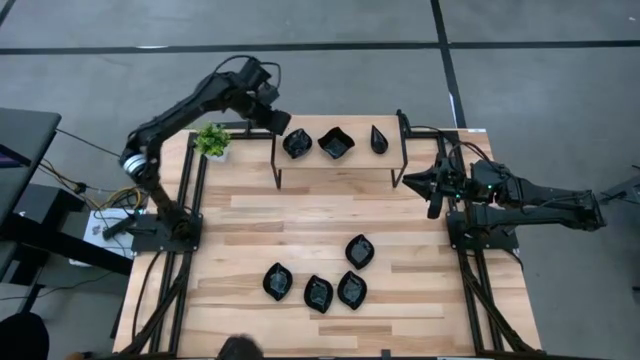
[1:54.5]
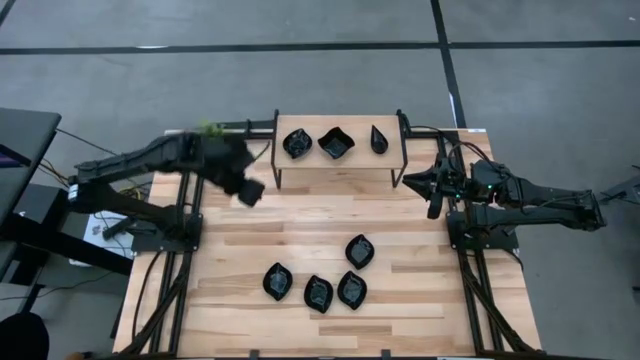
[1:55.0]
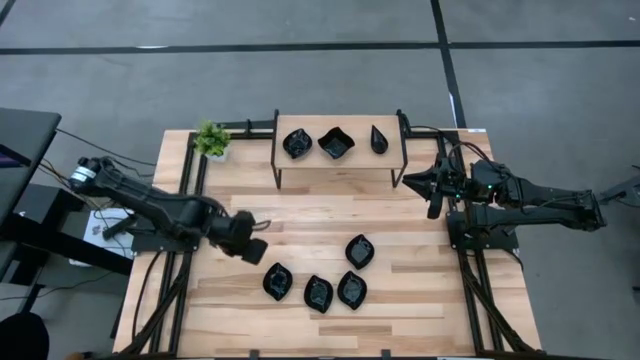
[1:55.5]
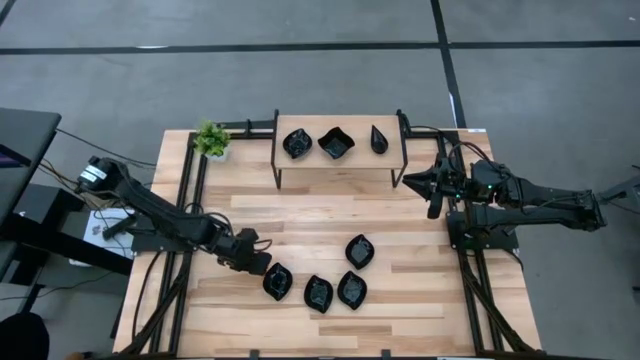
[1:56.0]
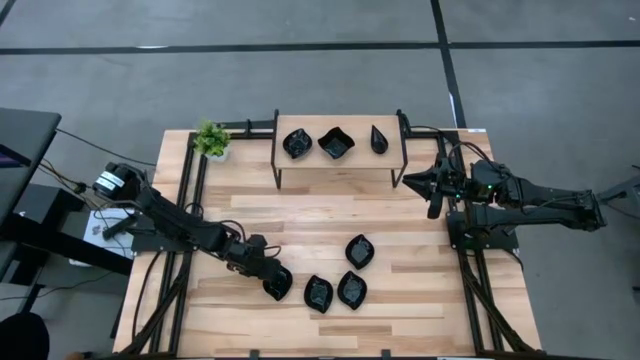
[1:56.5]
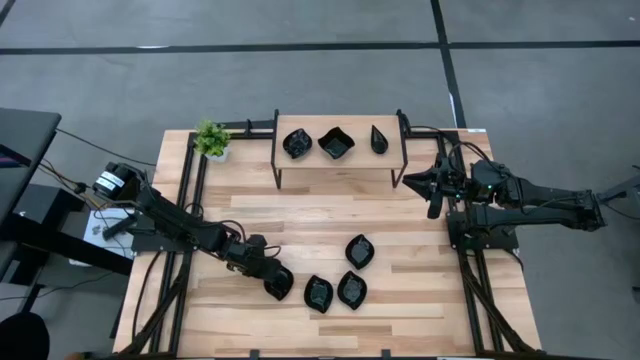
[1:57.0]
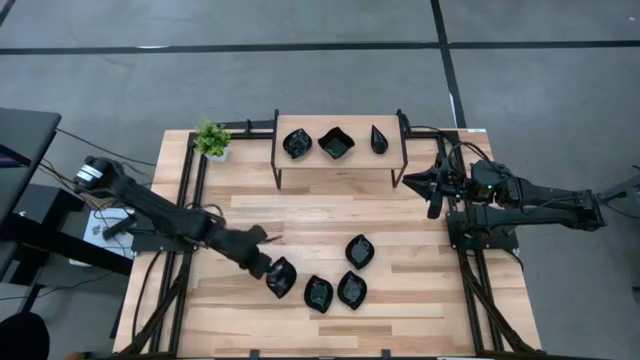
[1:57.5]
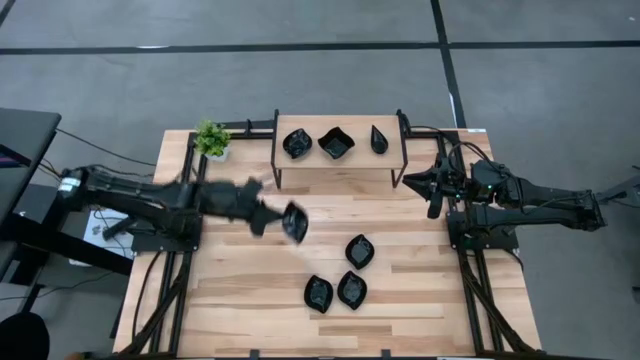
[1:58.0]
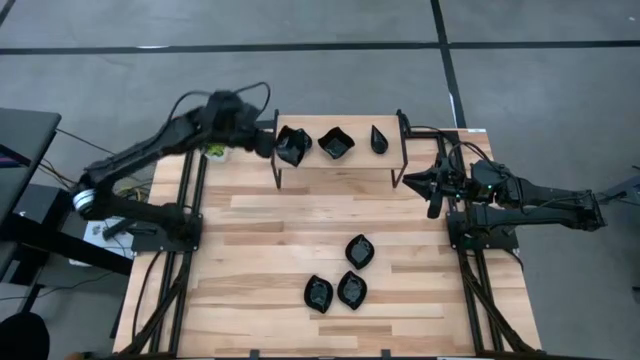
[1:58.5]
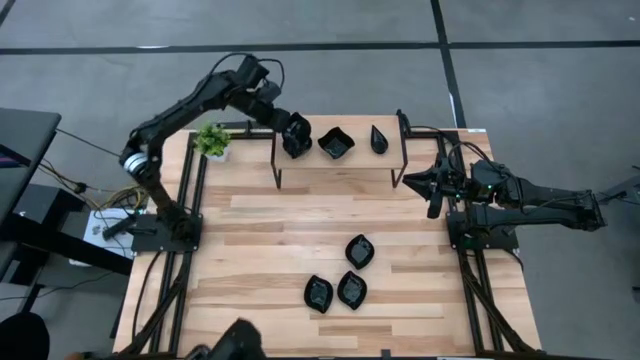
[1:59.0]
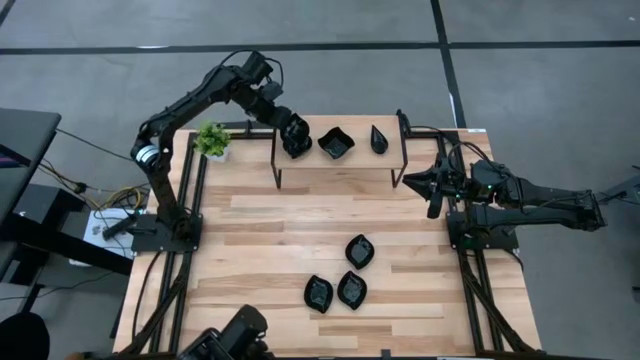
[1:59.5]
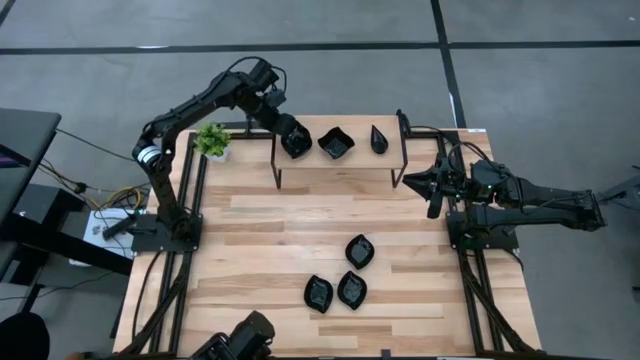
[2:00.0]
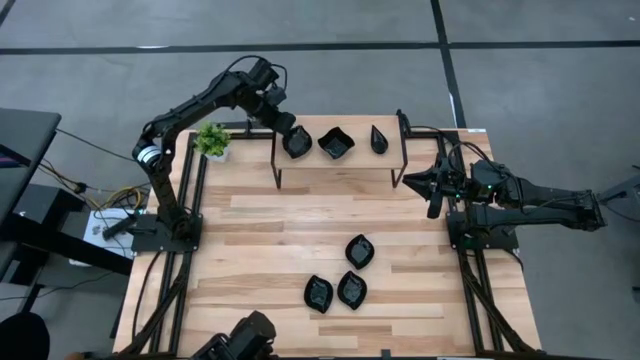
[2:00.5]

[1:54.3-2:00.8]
Task: Pick & Place Mini shaped plates
Stack the leaf shaped plate on top of the other leaf shaped plate on the shelf

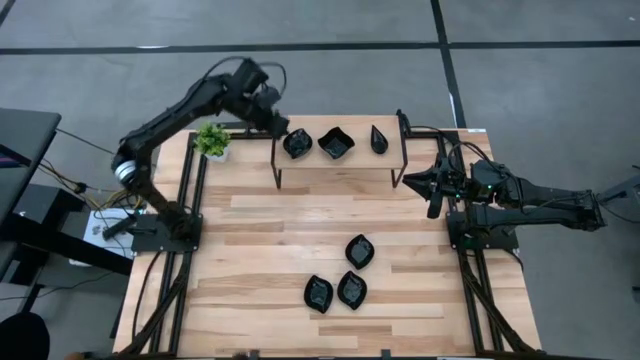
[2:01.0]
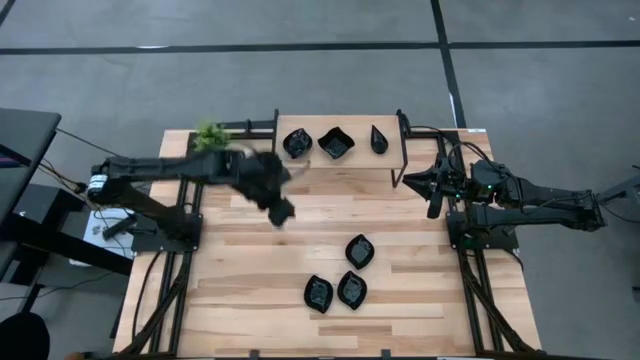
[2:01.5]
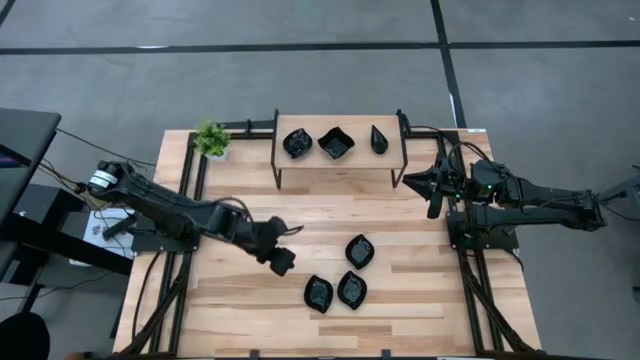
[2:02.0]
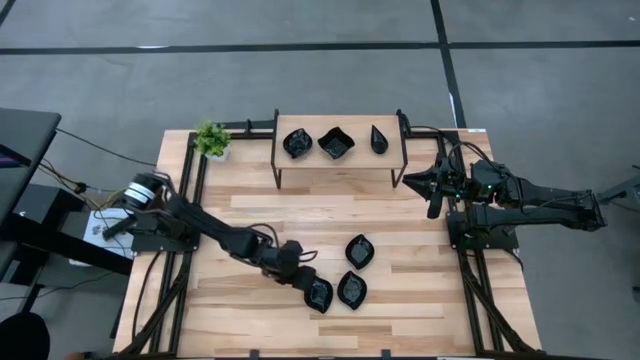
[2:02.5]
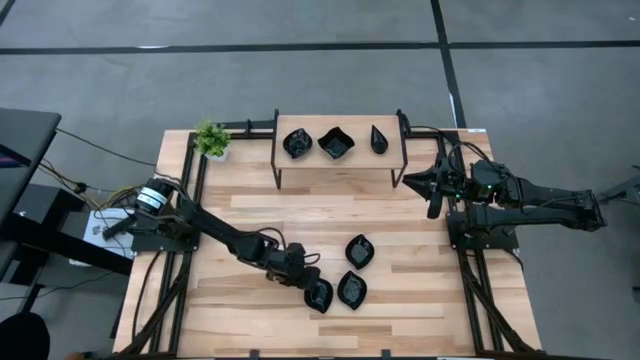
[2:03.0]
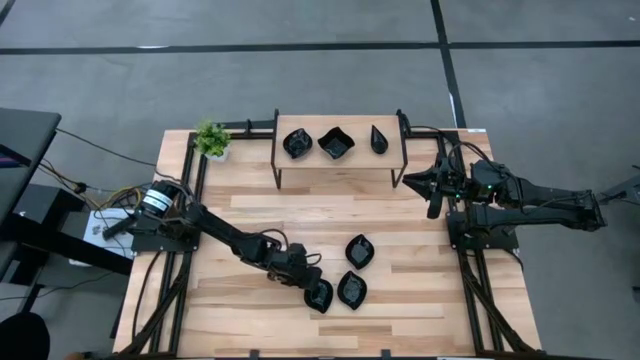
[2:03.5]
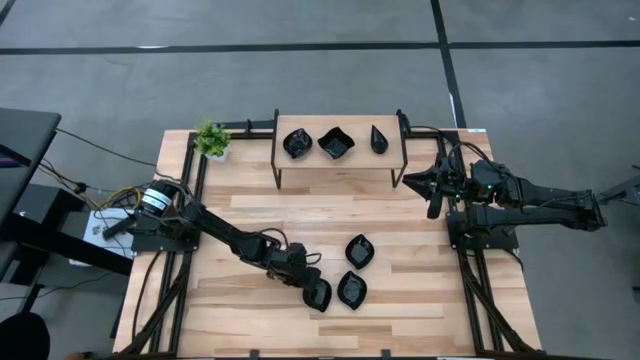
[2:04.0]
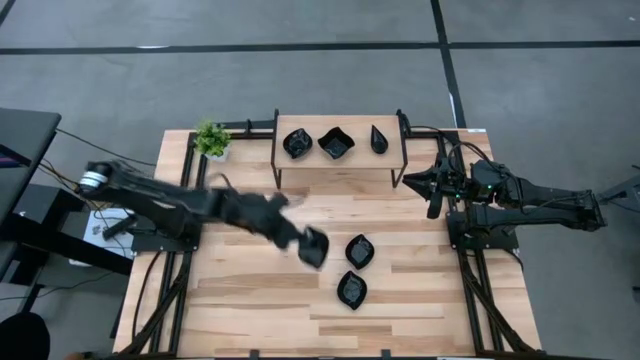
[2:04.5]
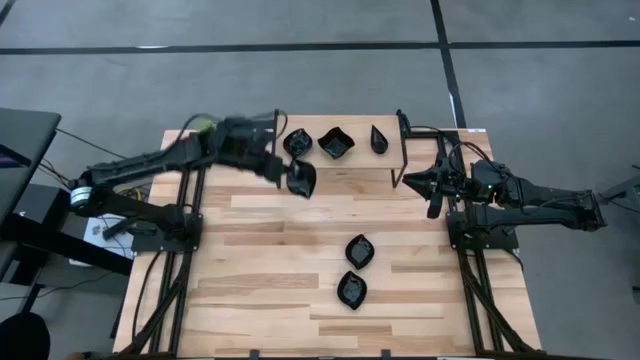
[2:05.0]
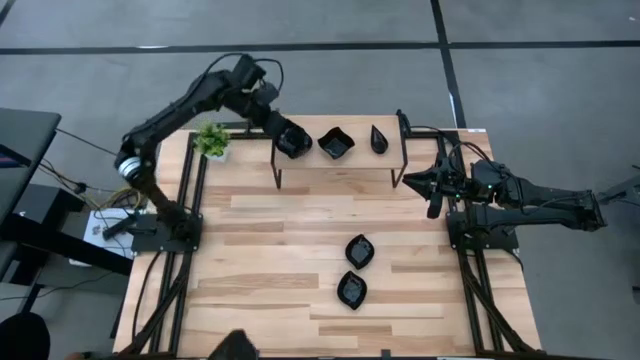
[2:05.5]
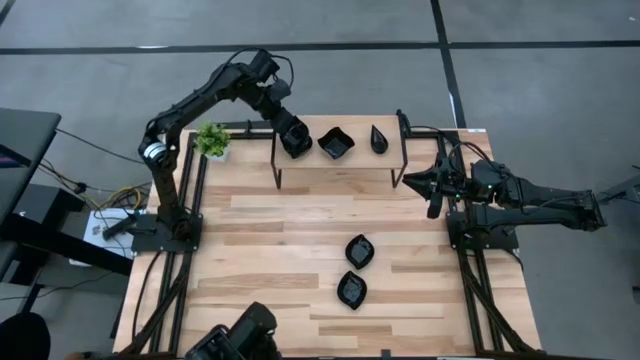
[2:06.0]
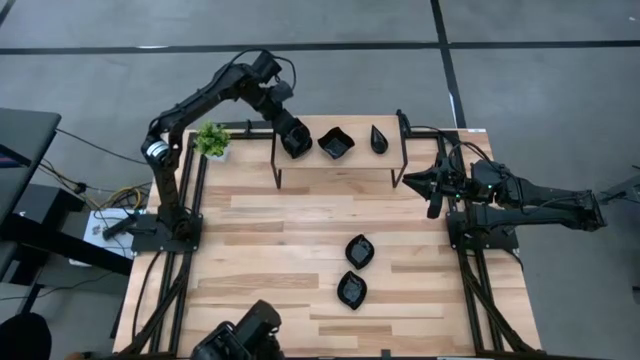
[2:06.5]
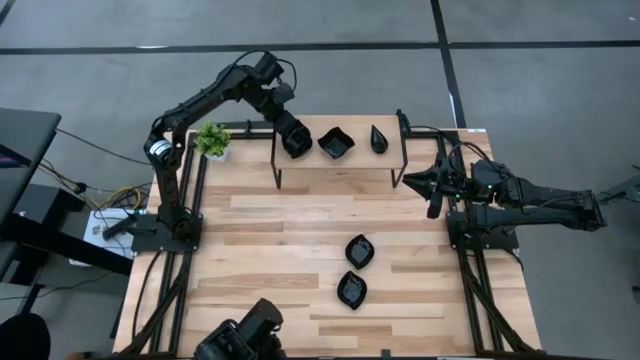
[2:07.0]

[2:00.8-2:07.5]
Stack the leaf shaped plate on top of the other leaf shaped plate on the shelf

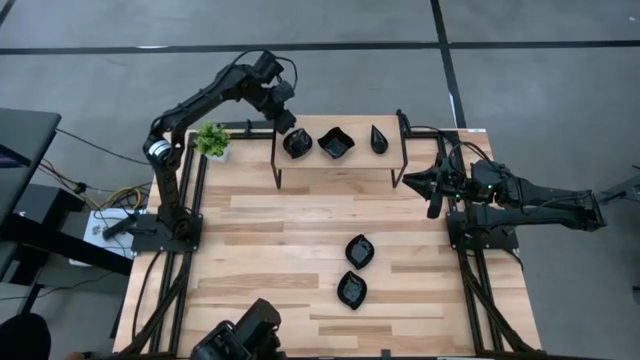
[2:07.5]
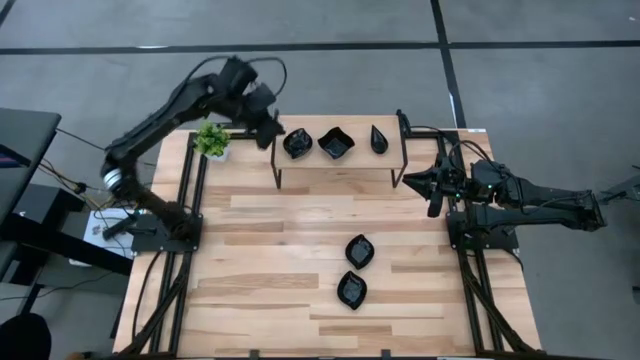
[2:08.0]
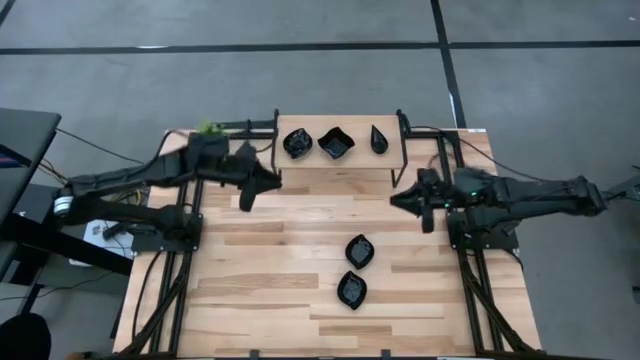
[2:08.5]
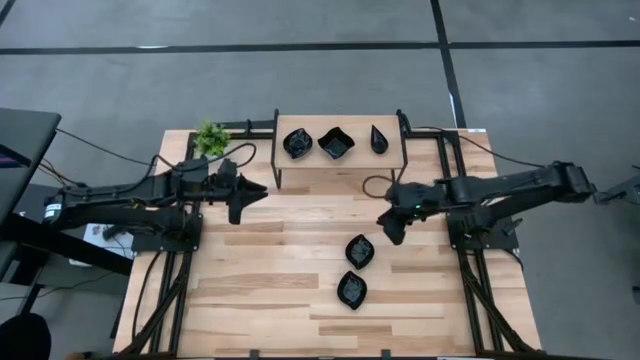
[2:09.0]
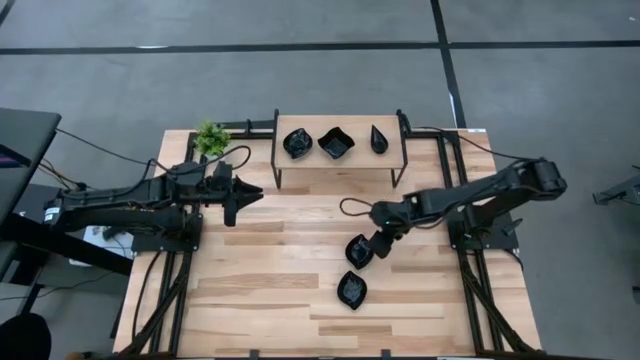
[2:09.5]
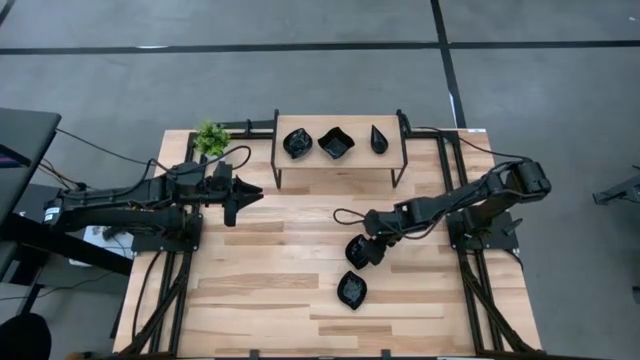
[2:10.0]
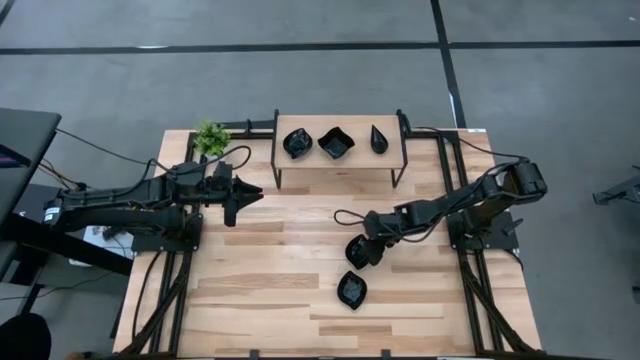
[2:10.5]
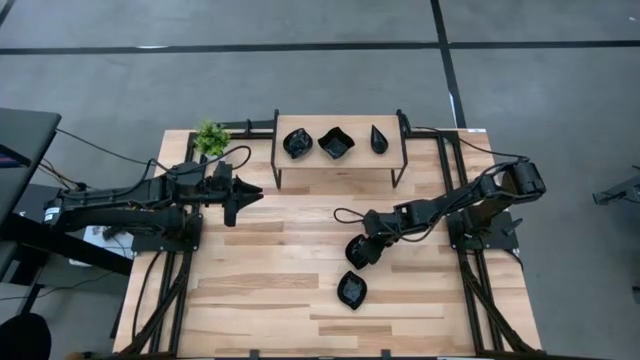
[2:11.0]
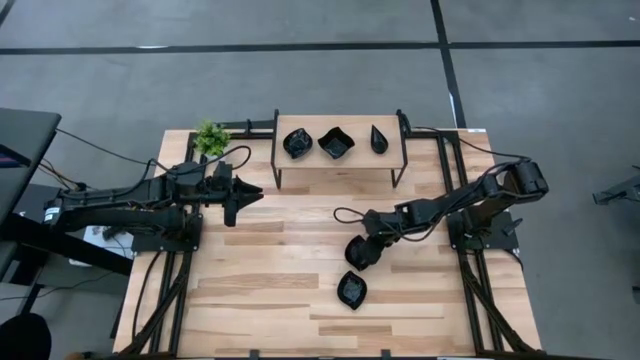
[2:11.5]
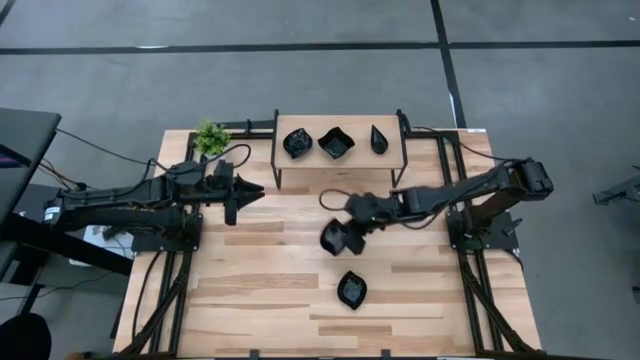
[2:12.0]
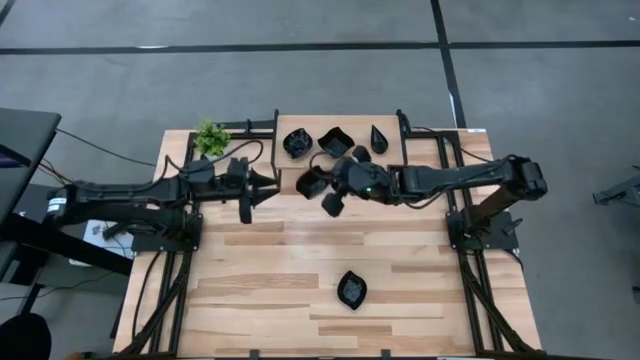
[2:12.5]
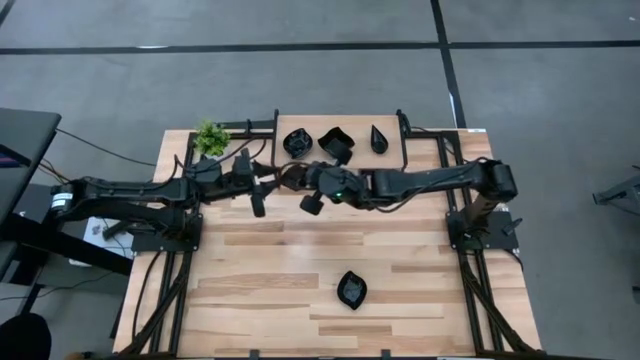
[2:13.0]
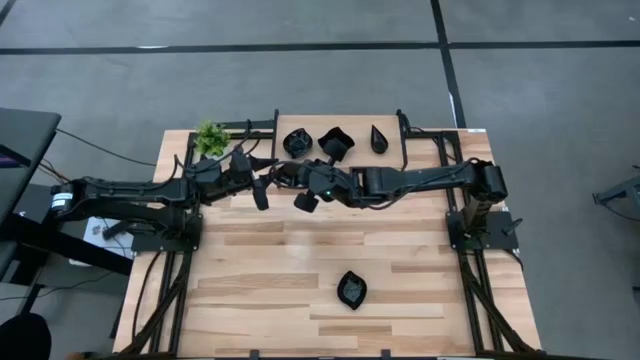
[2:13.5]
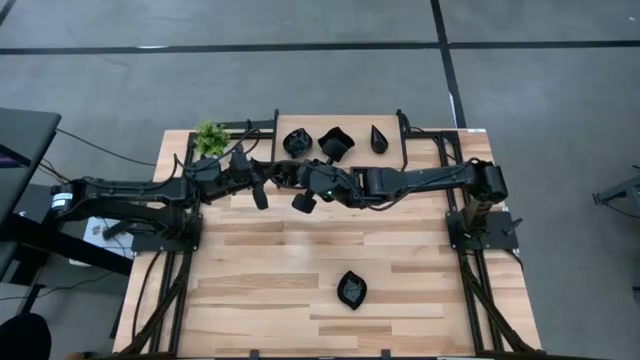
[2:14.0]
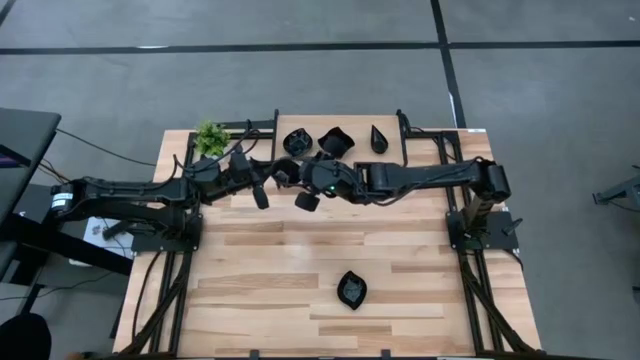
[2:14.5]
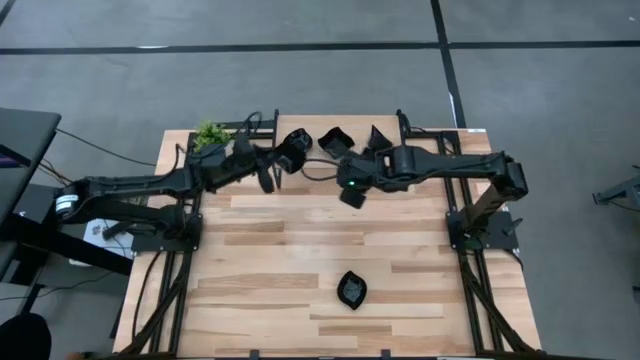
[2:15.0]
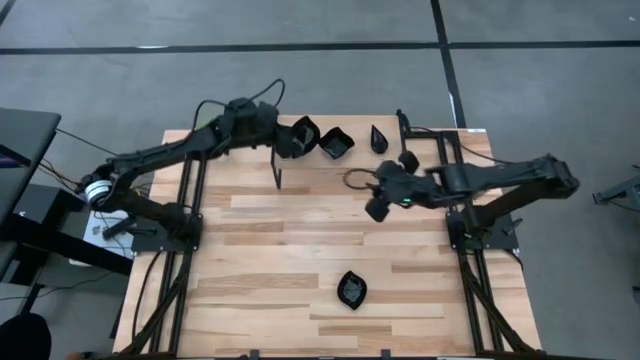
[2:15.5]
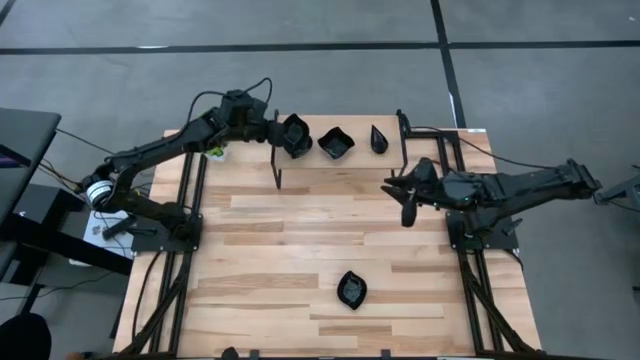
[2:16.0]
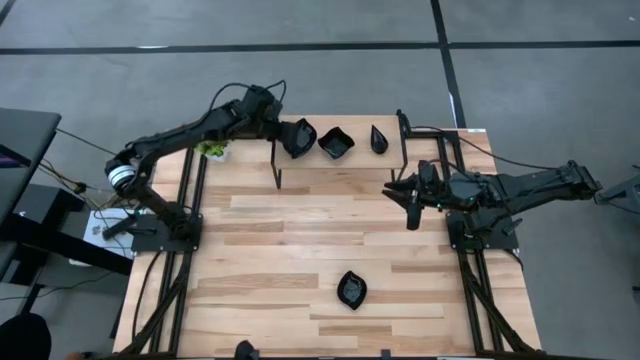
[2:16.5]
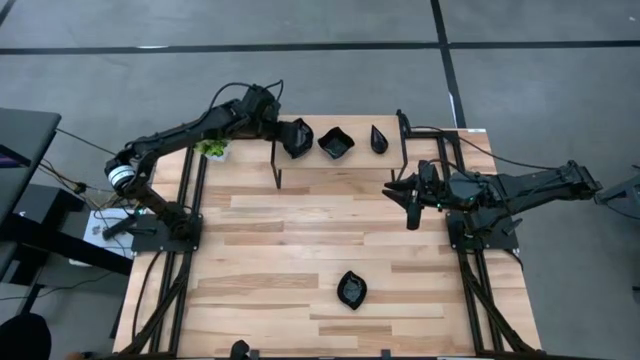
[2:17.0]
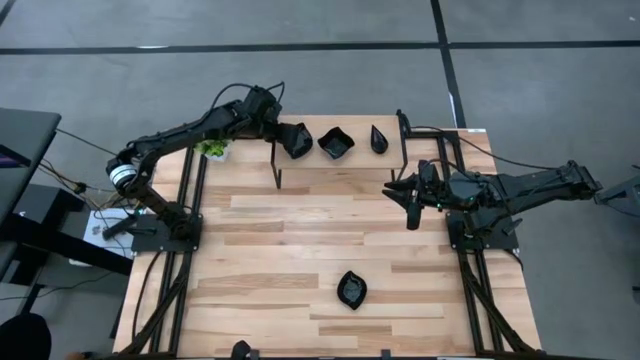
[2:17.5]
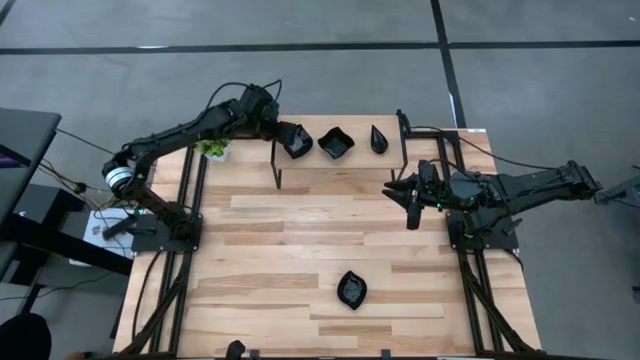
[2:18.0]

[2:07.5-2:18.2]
Stack the leaf shaped plate on top of the other leaf shaped plate on the shelf
